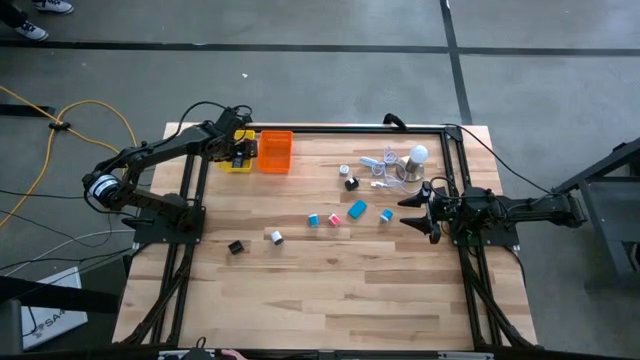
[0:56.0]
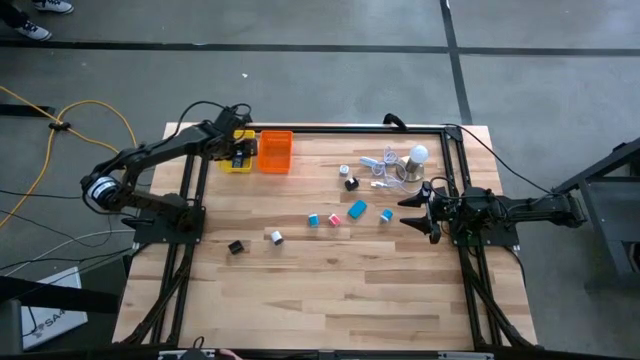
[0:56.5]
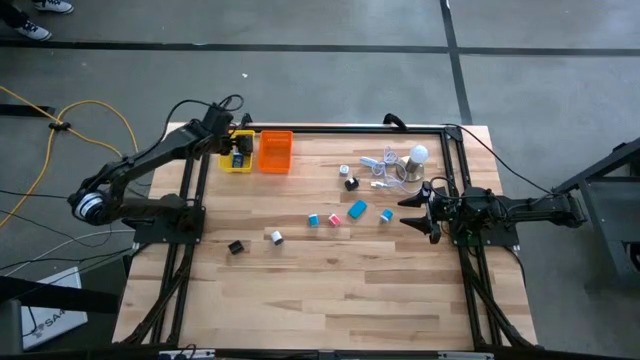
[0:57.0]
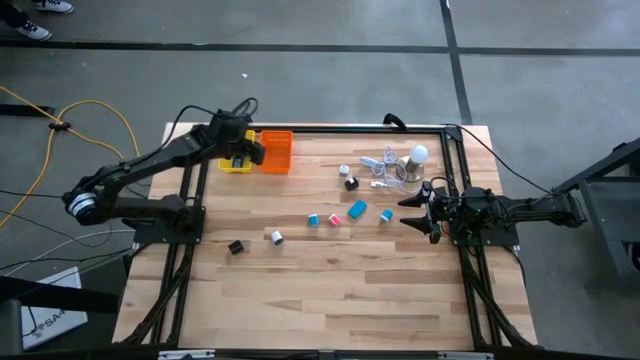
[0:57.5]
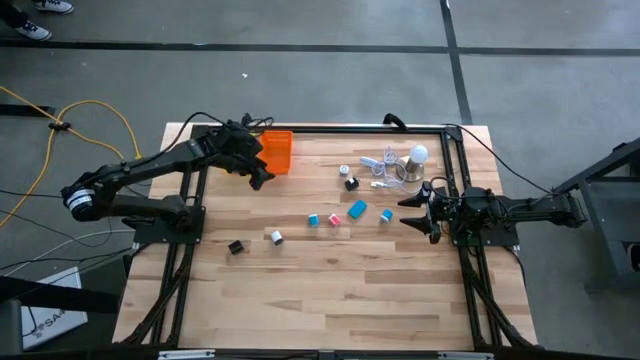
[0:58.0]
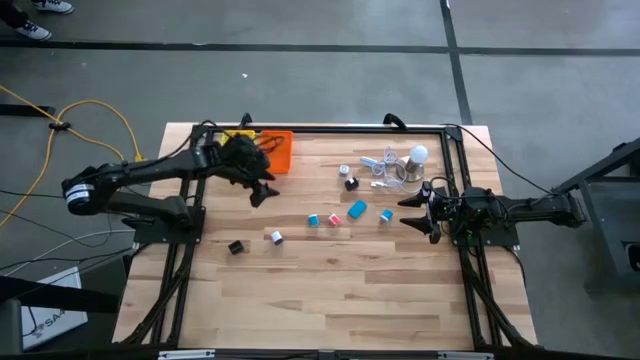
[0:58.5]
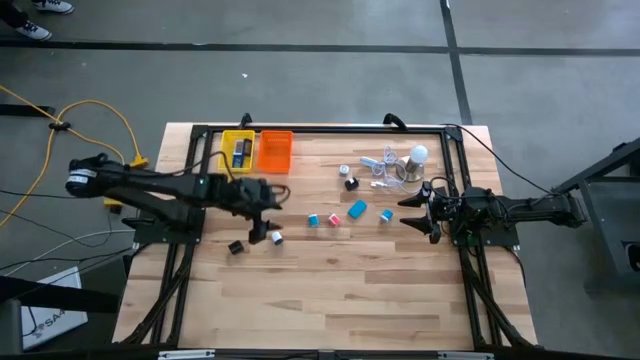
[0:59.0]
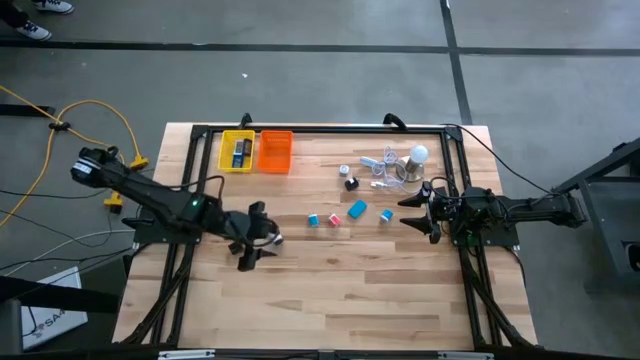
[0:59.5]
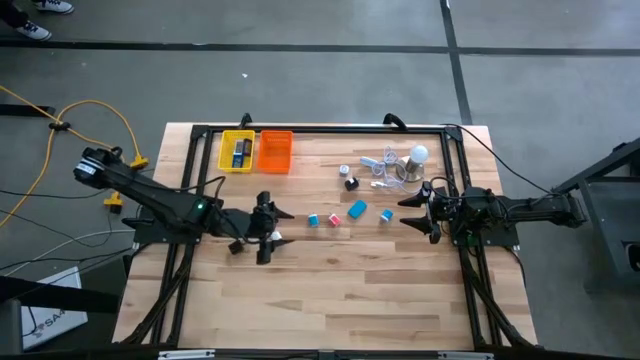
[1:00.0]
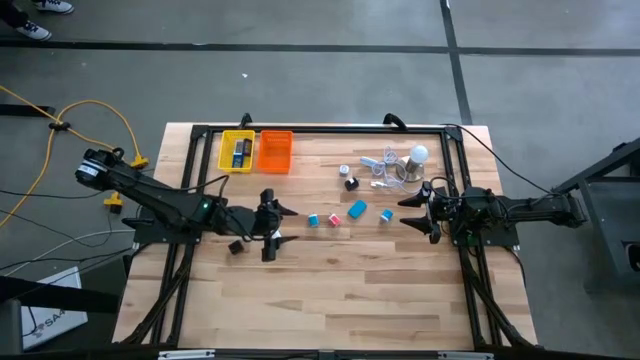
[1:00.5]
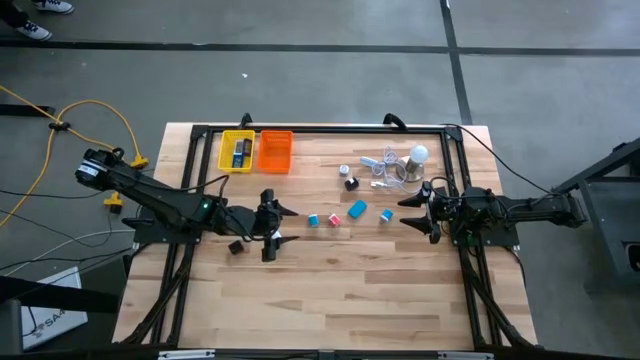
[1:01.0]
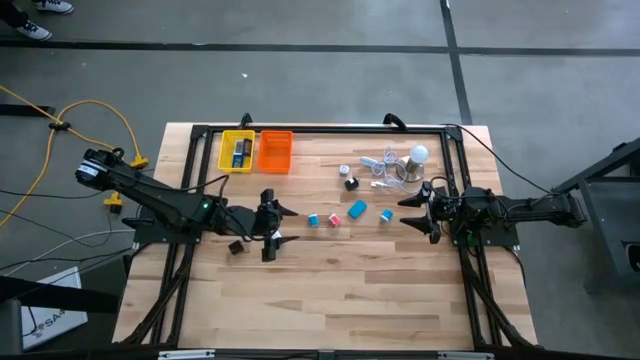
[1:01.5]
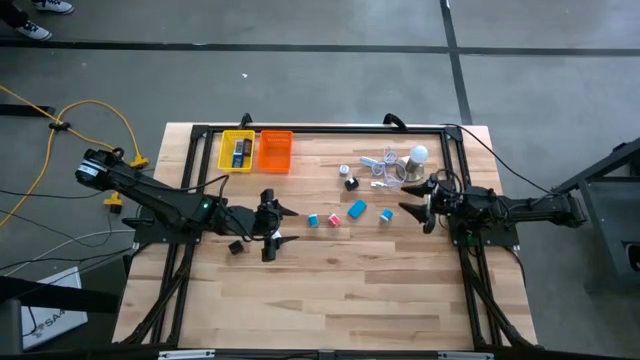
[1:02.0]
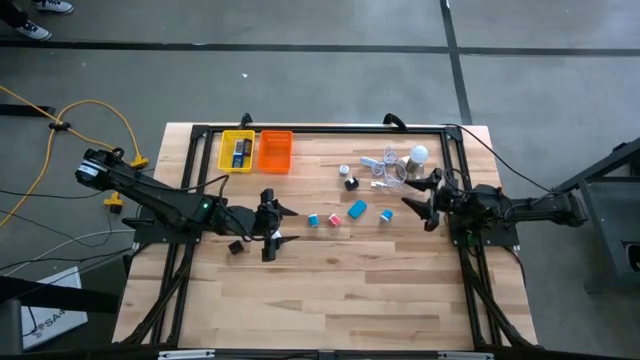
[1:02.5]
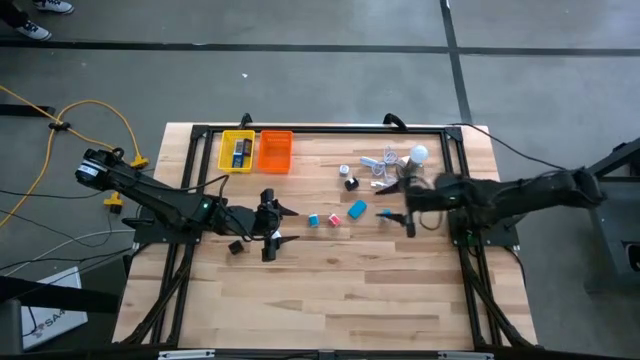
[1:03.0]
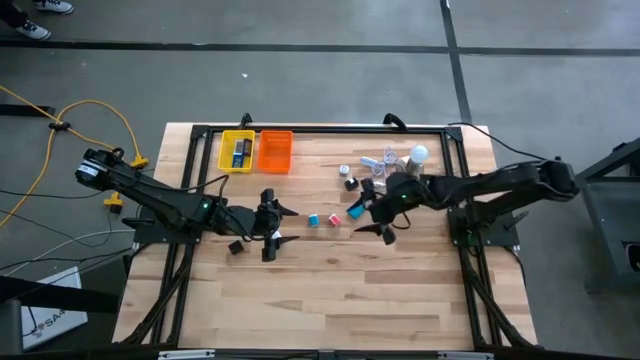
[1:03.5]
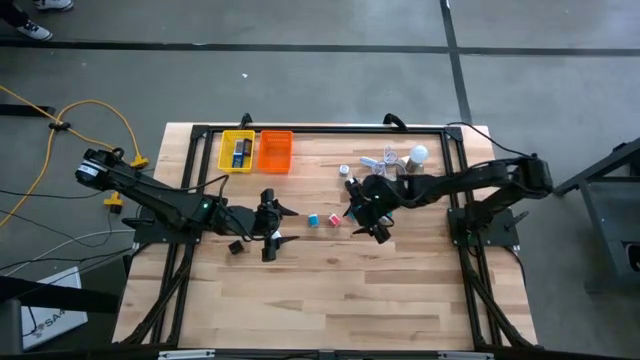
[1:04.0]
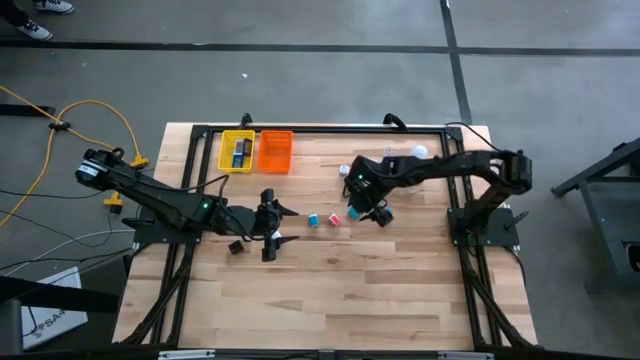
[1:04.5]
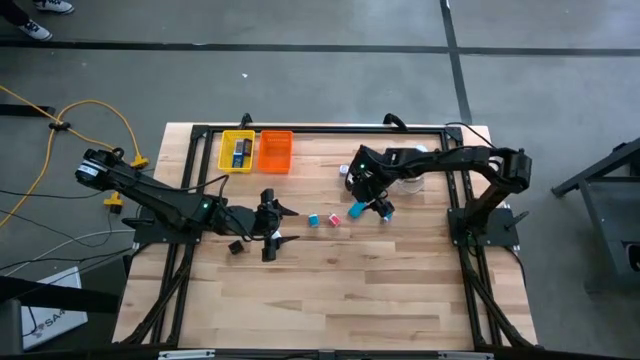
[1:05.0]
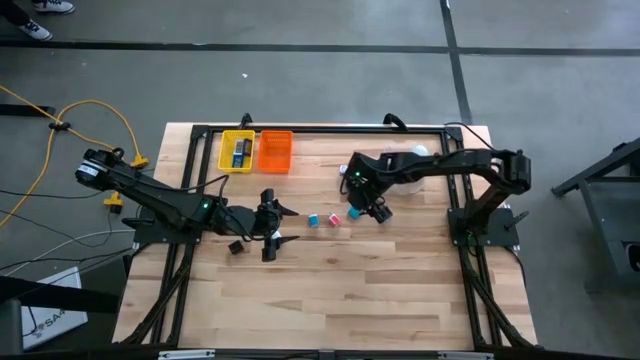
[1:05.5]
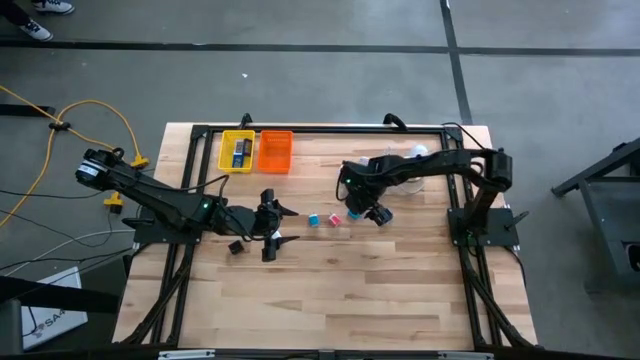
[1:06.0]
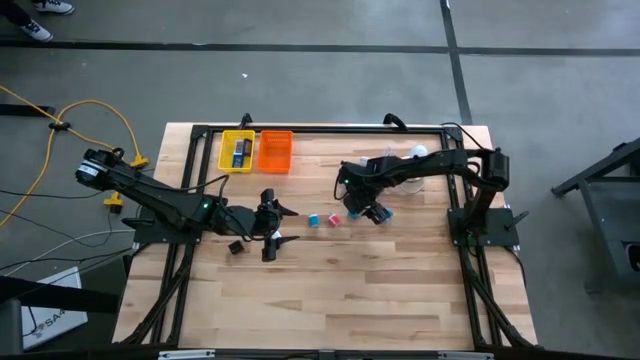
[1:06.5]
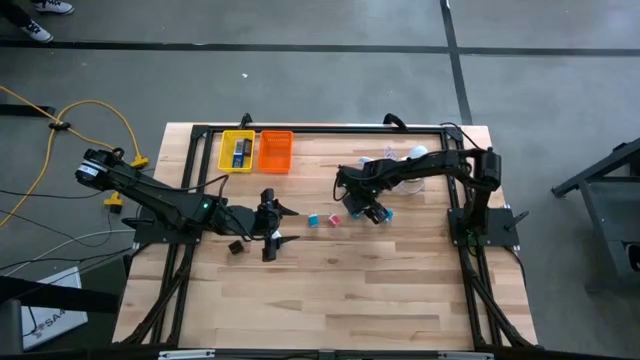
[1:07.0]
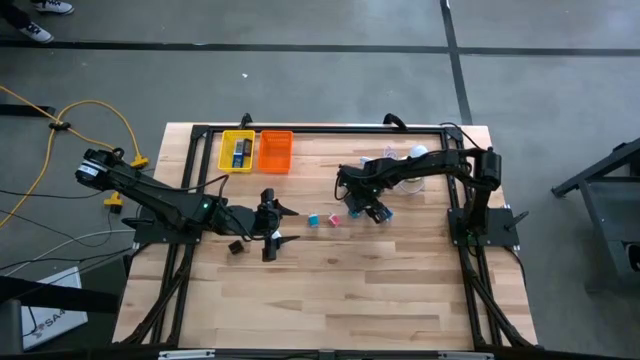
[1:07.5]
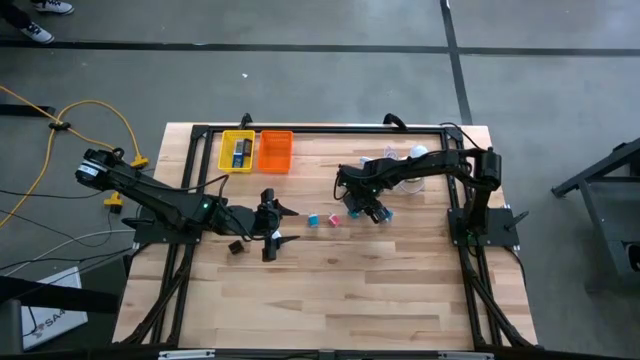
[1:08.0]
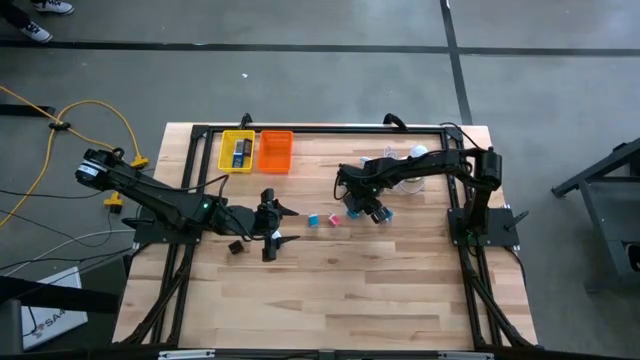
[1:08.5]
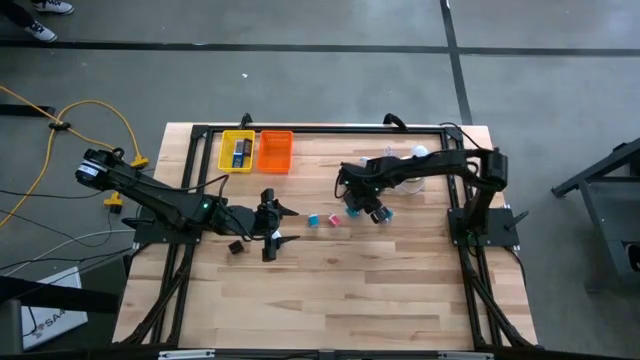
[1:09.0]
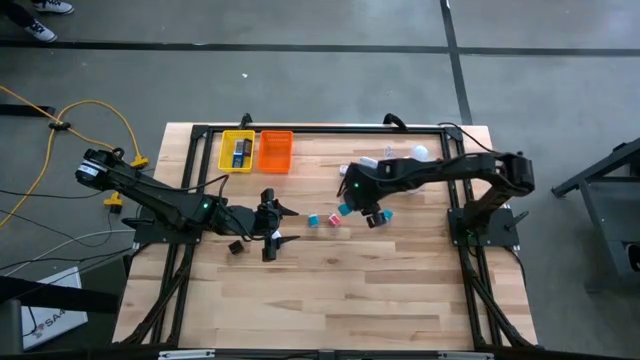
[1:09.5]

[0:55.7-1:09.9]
Task: Pick & Place Office items
Put the light blue digital clock into the yellow basket
